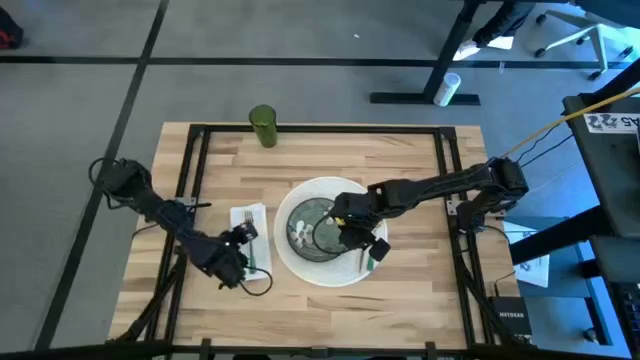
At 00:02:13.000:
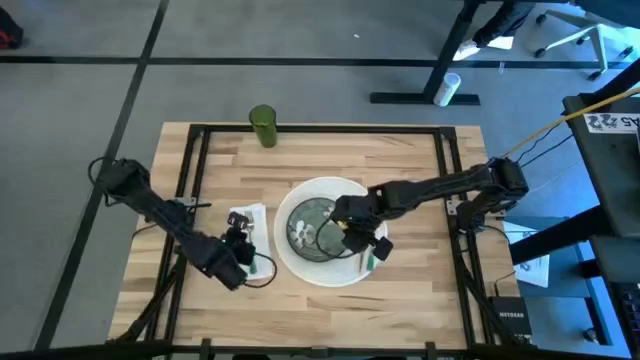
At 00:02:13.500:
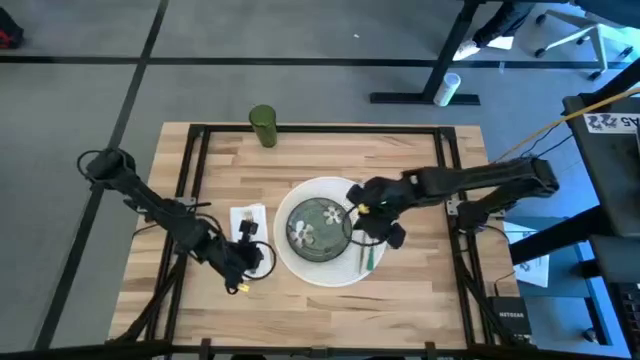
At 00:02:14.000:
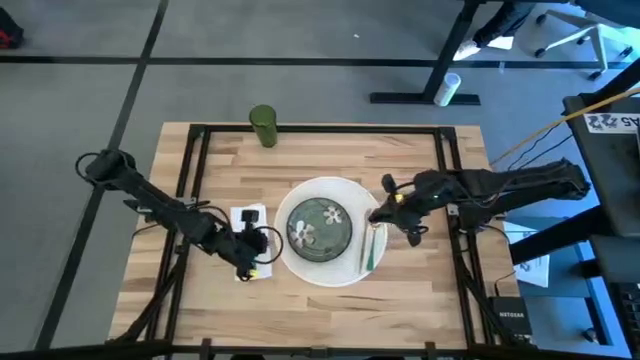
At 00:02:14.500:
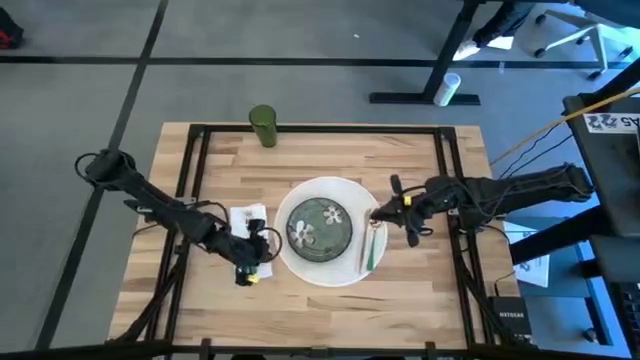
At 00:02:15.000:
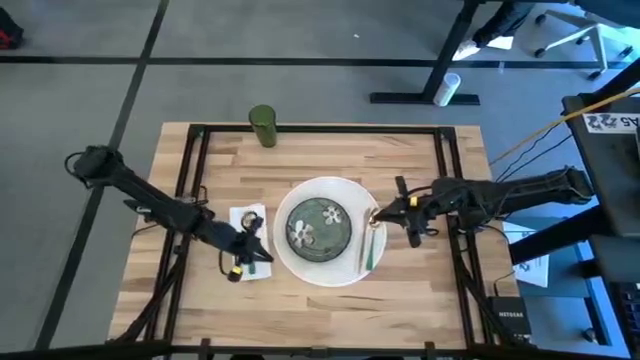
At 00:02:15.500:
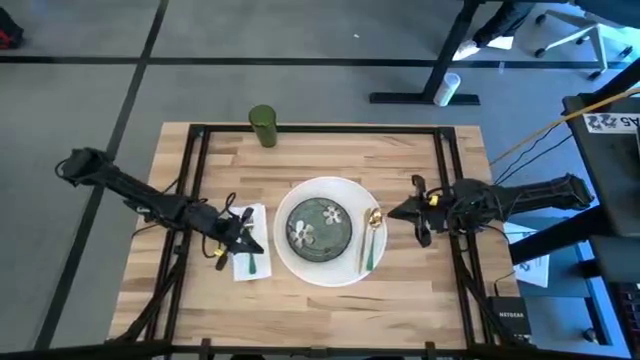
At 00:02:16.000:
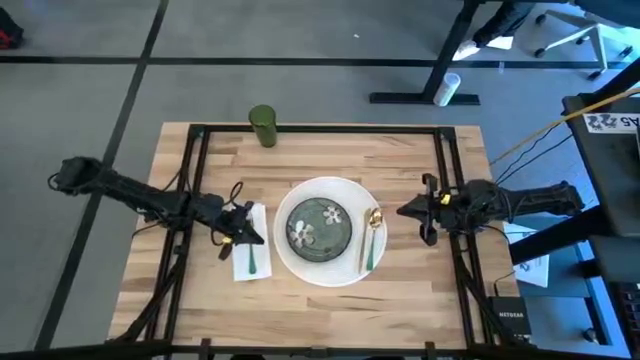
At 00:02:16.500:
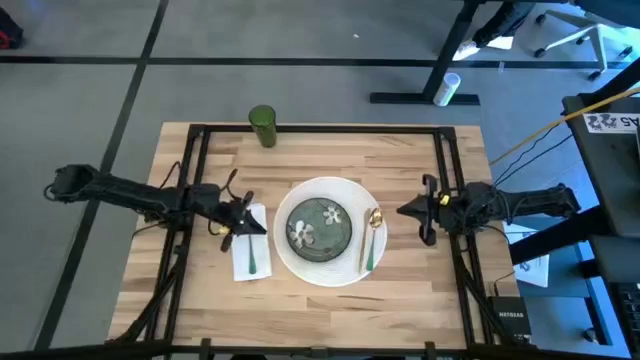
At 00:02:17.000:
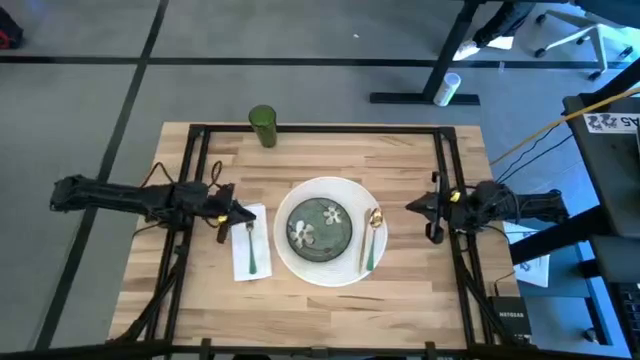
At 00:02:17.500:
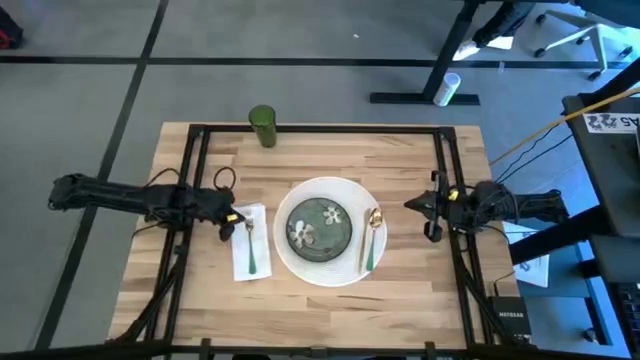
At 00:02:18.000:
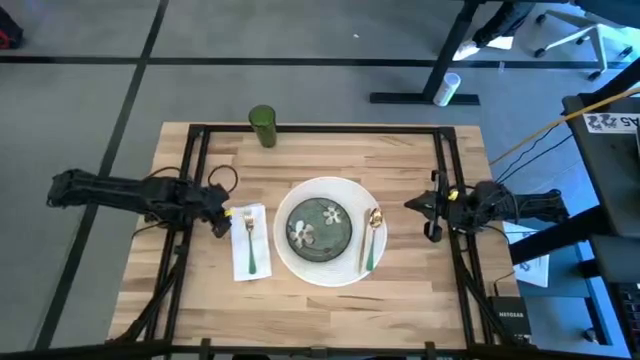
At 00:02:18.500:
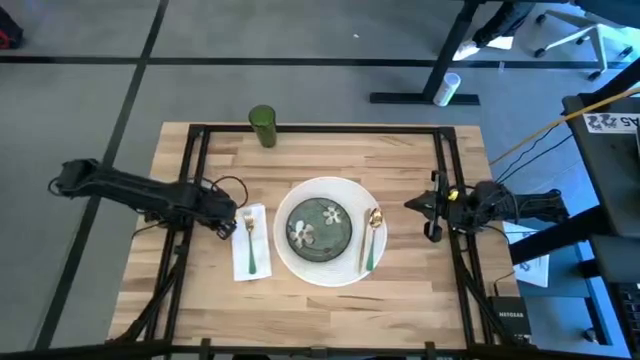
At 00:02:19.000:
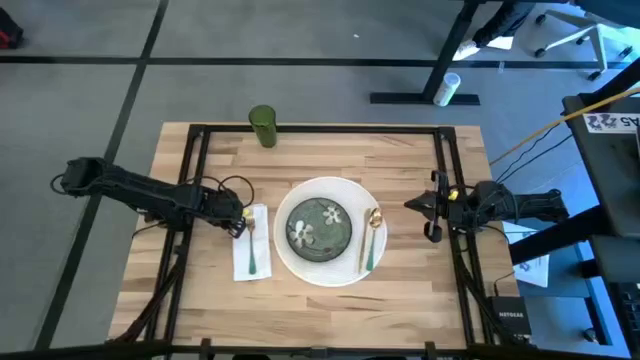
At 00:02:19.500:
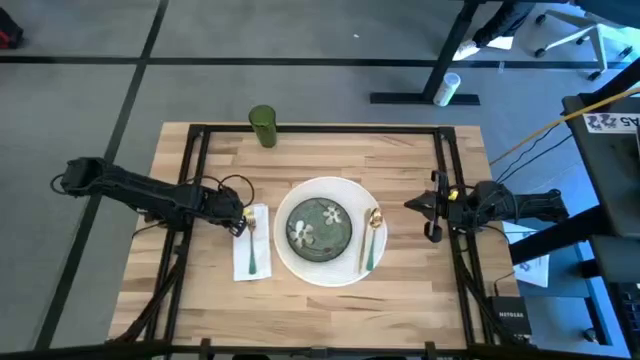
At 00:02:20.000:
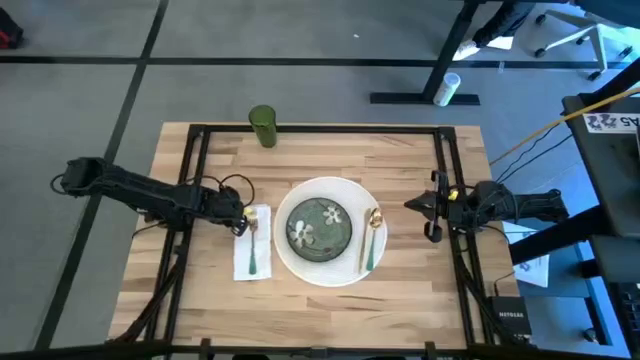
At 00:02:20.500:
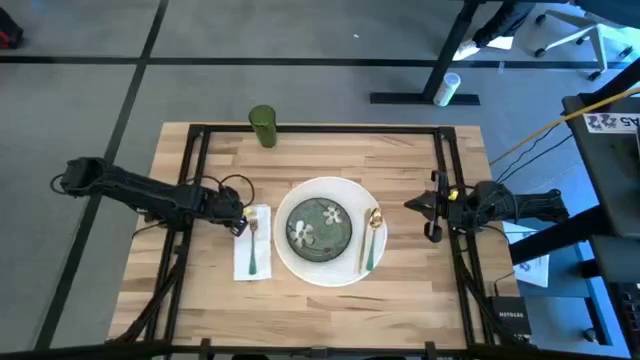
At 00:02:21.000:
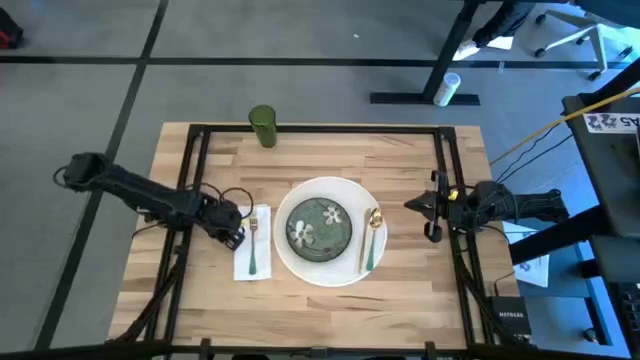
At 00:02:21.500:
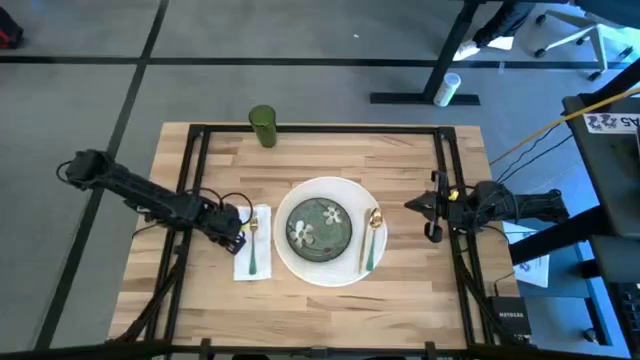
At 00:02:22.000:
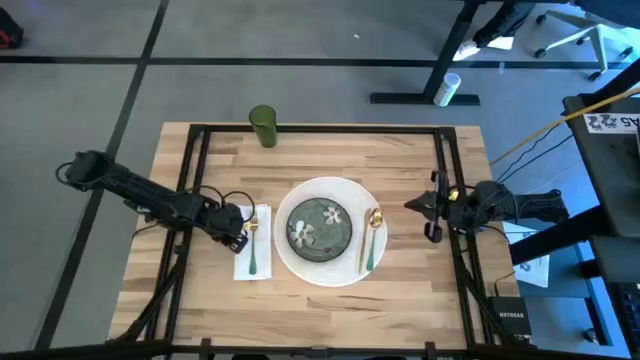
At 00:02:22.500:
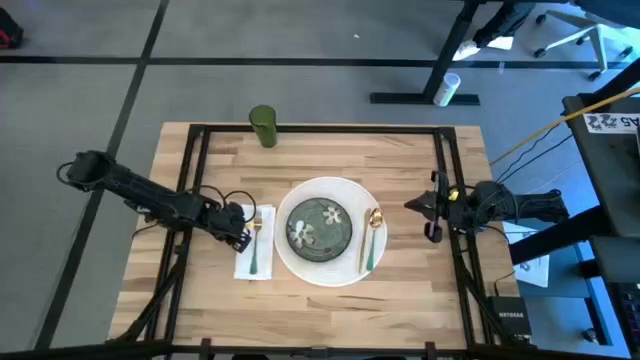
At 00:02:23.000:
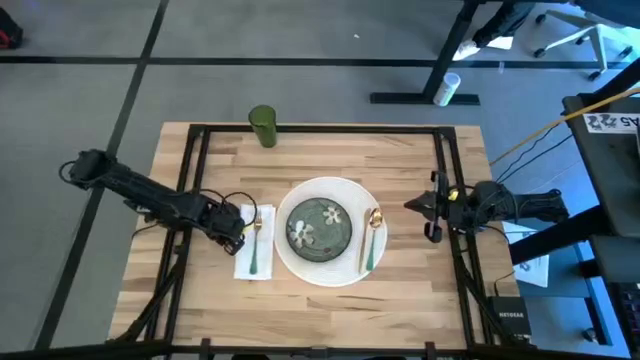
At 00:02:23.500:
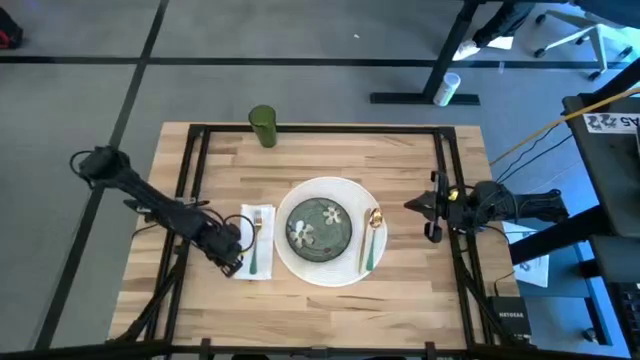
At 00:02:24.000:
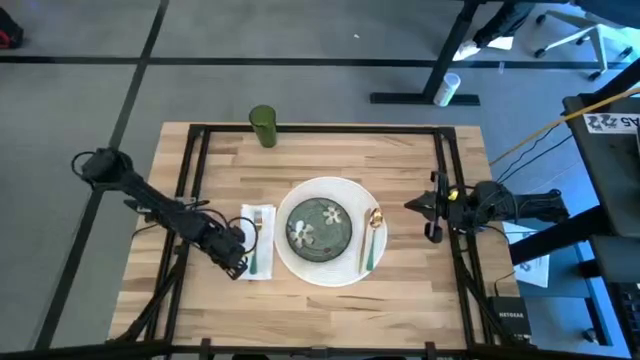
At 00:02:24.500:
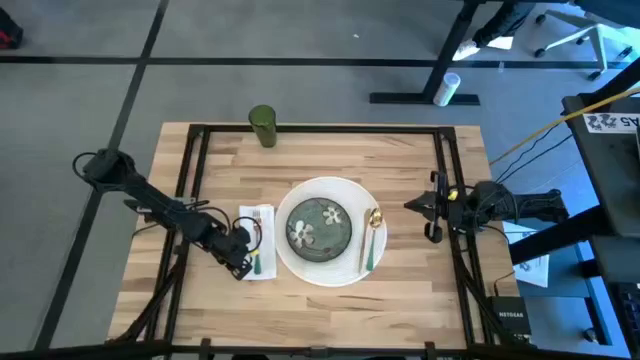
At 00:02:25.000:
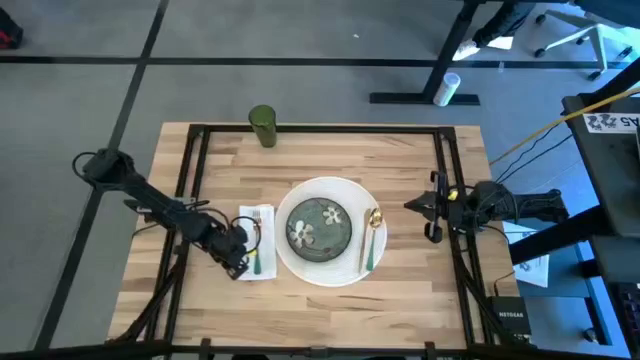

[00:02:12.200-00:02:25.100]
Task: Set table place
Adjust the white table napkin

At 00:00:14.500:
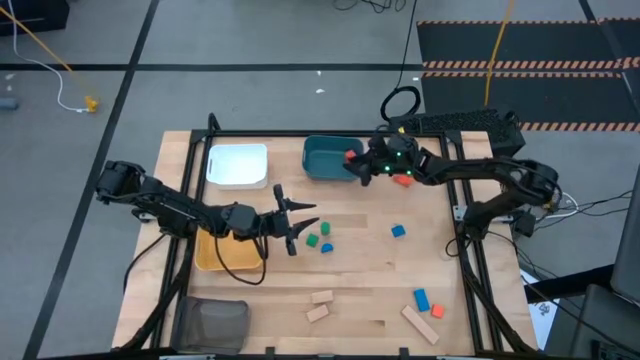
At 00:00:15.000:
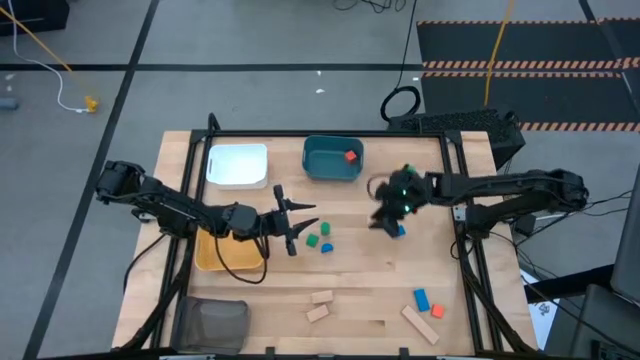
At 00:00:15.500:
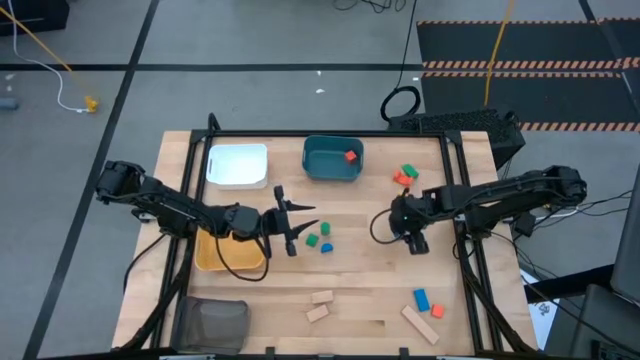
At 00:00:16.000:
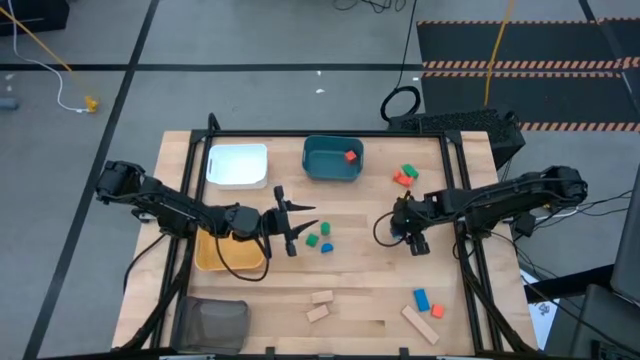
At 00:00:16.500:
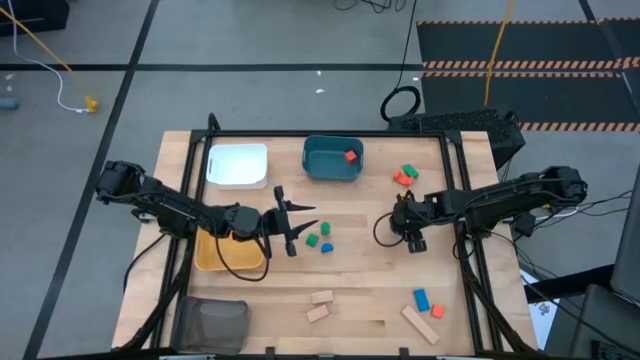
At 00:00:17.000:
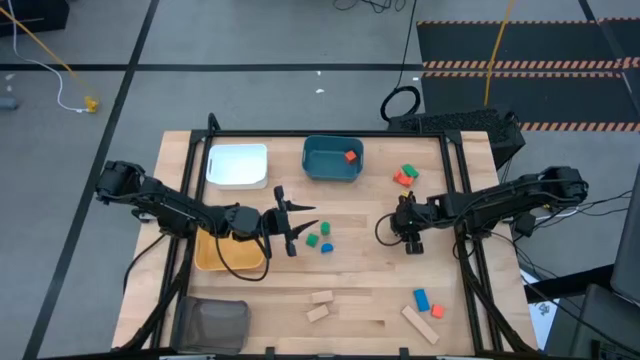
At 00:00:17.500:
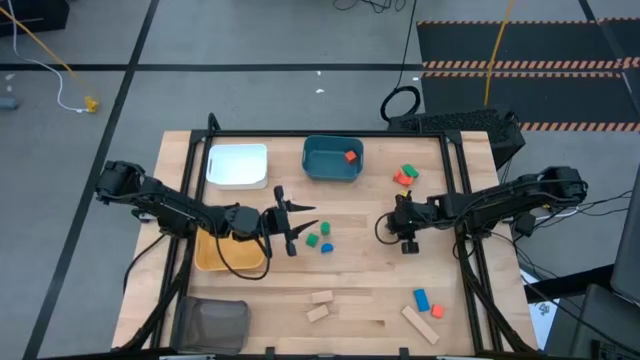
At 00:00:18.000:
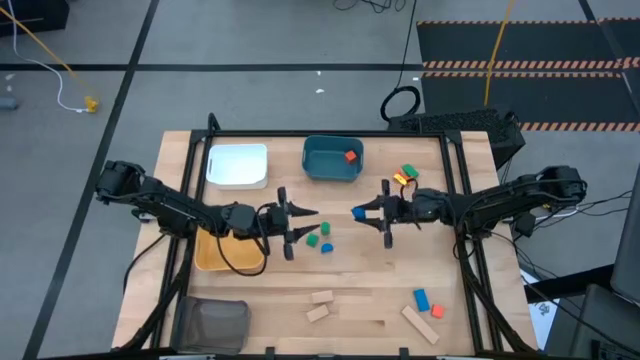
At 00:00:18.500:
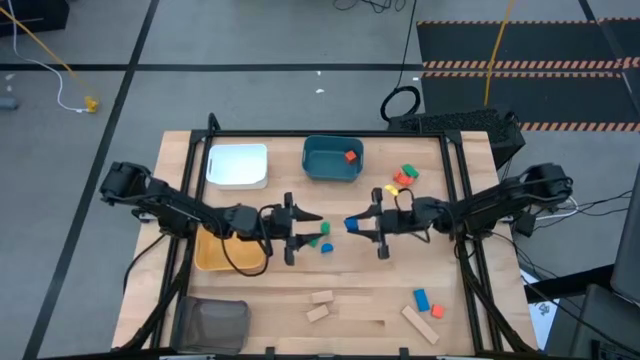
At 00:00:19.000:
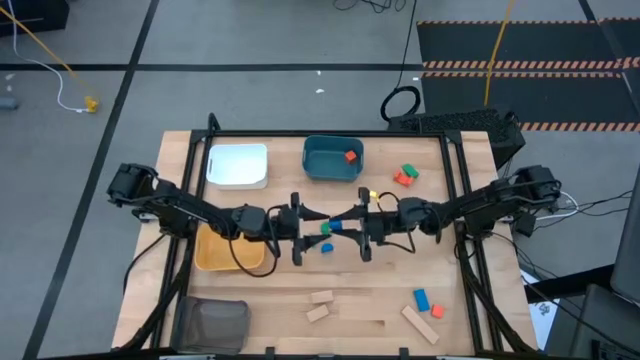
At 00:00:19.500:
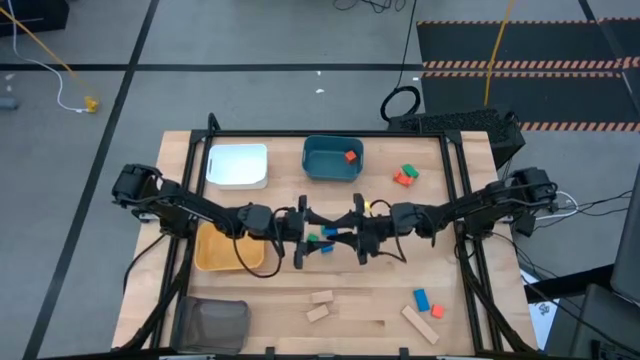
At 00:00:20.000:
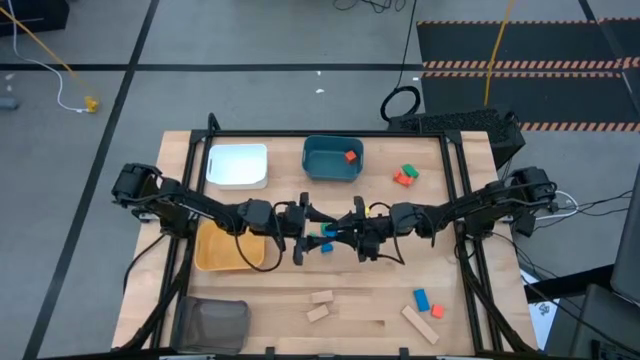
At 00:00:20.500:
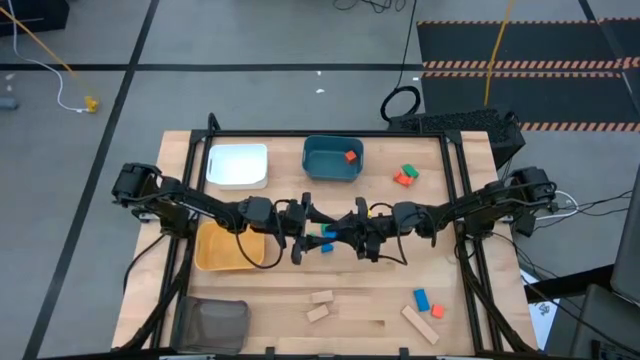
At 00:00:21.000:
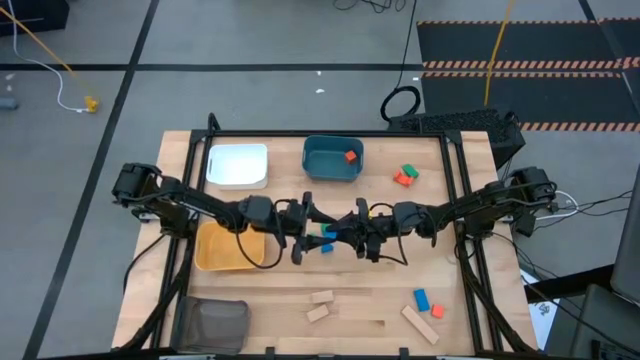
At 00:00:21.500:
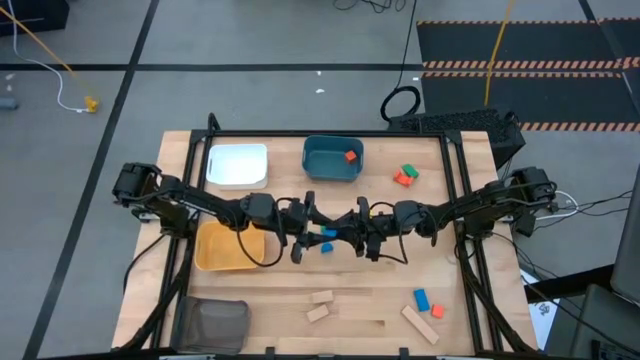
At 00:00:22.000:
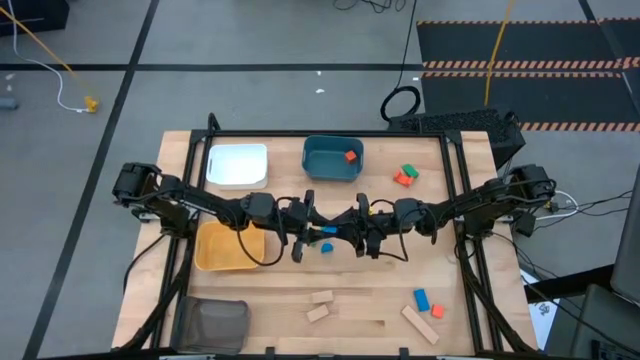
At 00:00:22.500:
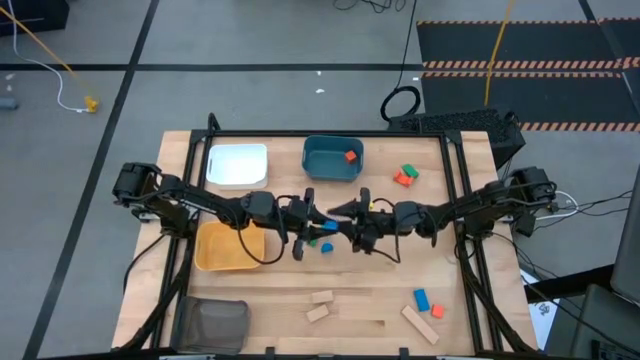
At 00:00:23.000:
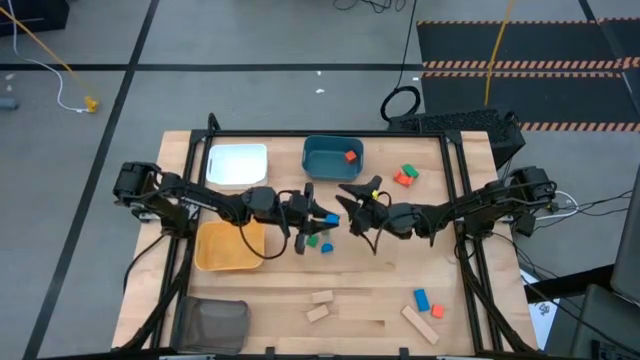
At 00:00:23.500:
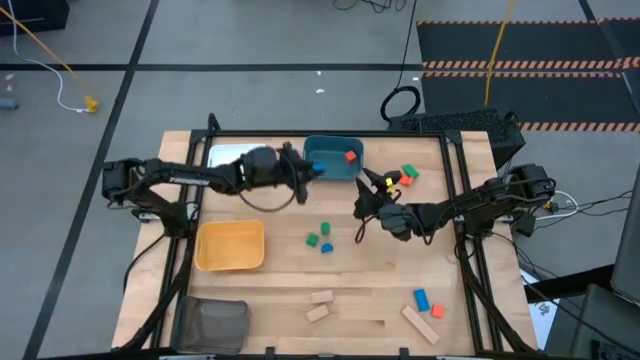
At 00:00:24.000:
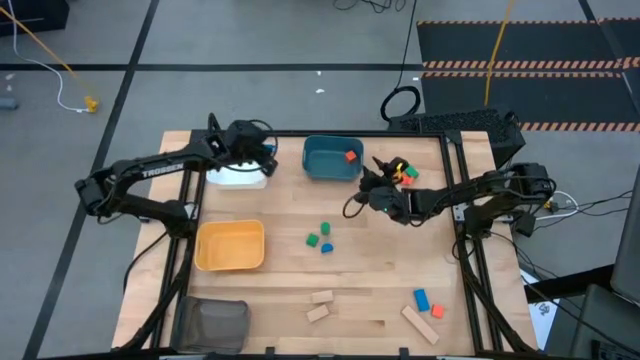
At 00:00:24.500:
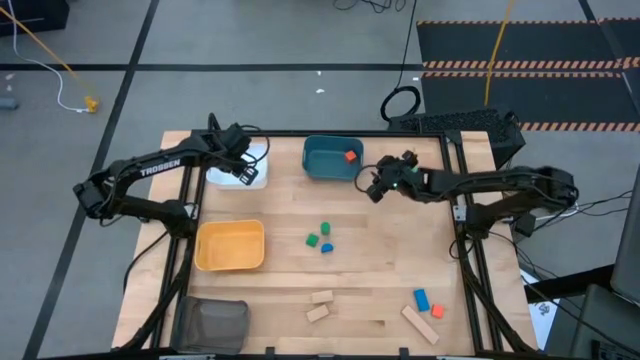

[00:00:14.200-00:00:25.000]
Task: Sort & place blocks by color
Put the top right blue wooden block into the white bin
